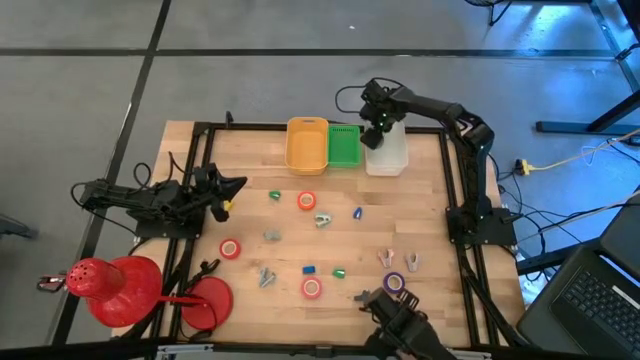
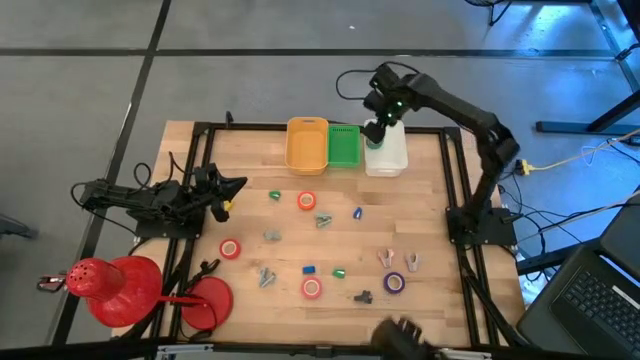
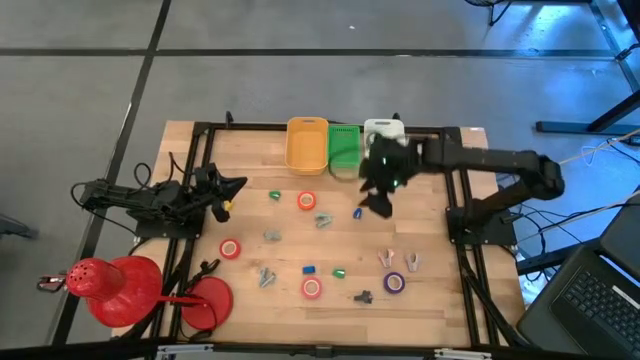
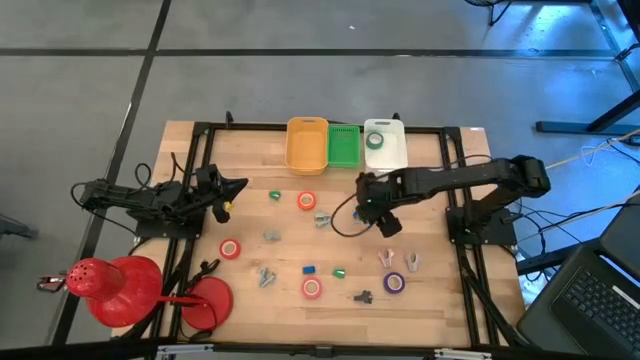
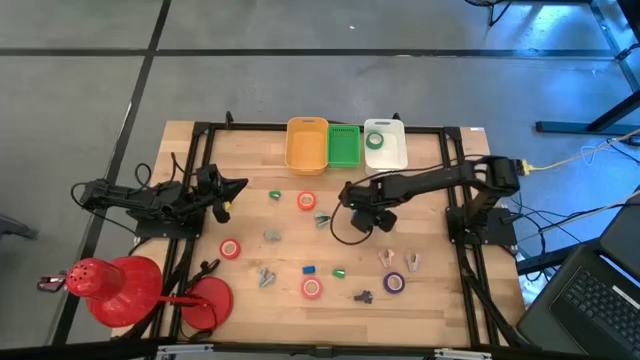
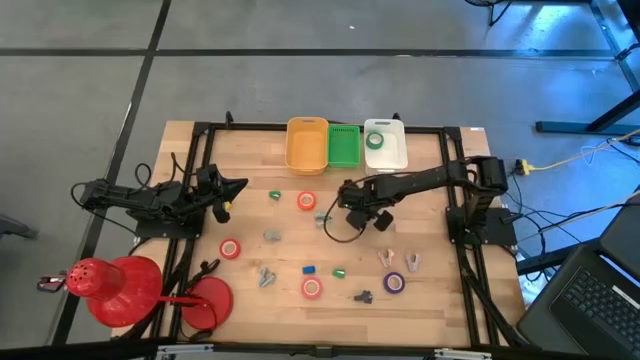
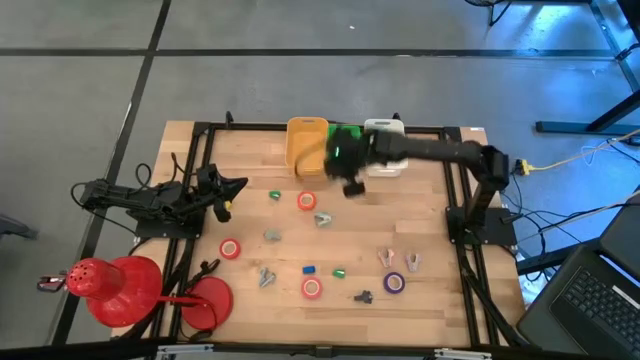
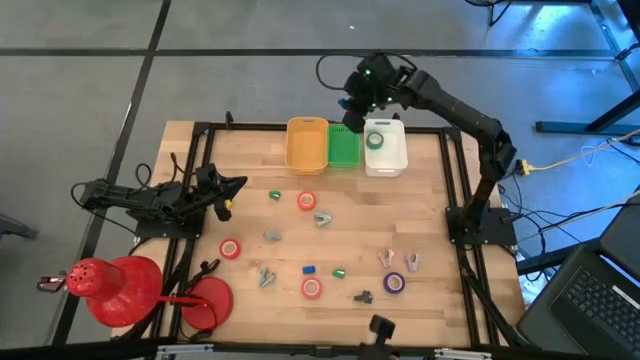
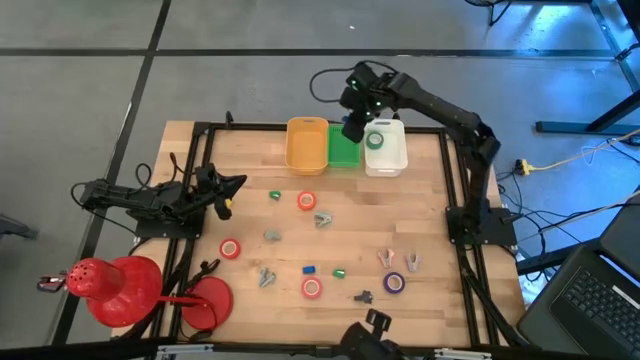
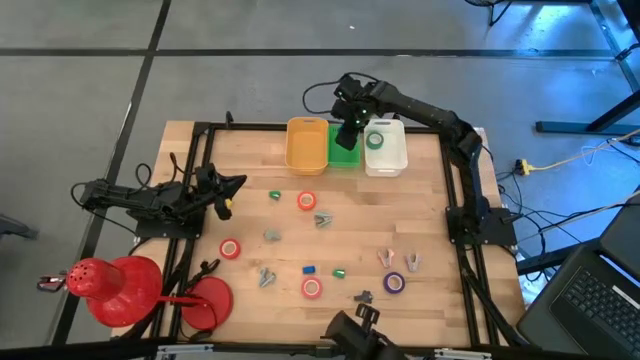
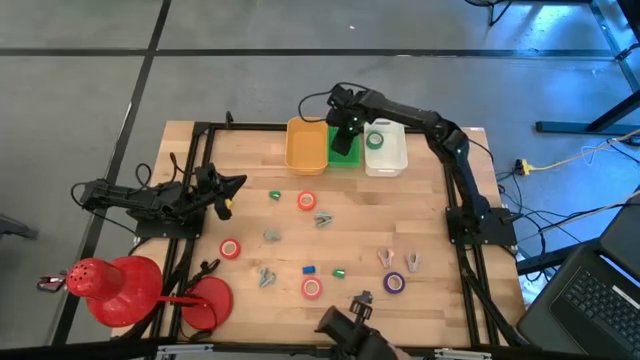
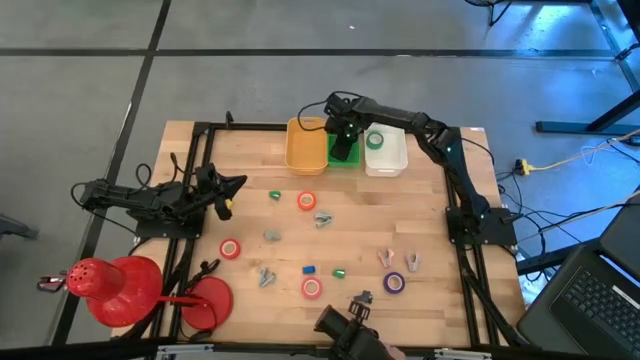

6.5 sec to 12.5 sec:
Task: Pick and place Stapler, Stapler remover, tape
Put the right blue stapler into the green bin

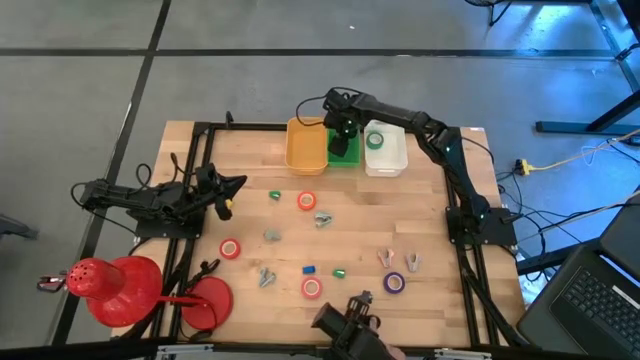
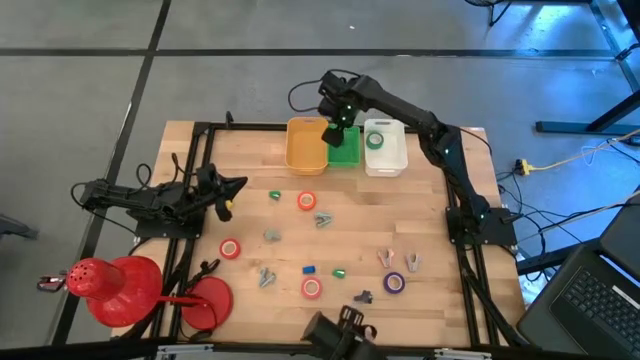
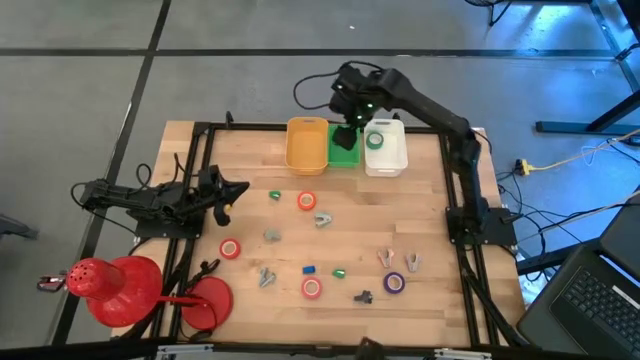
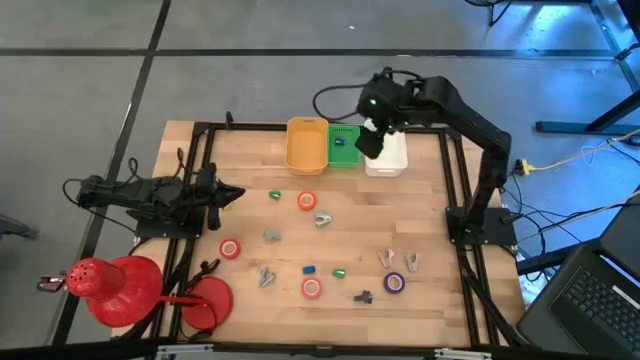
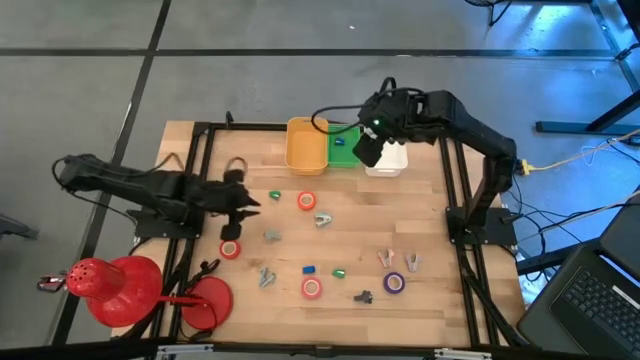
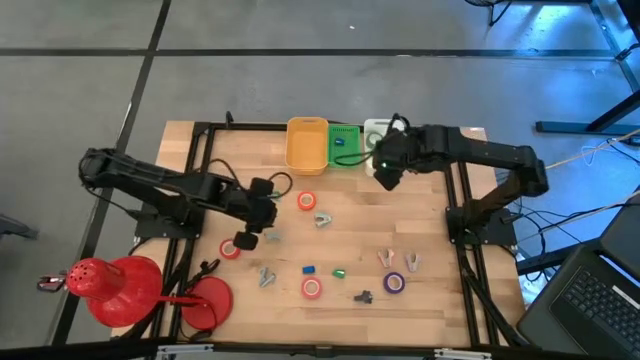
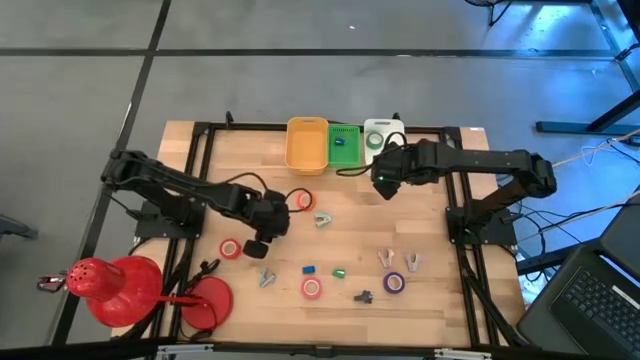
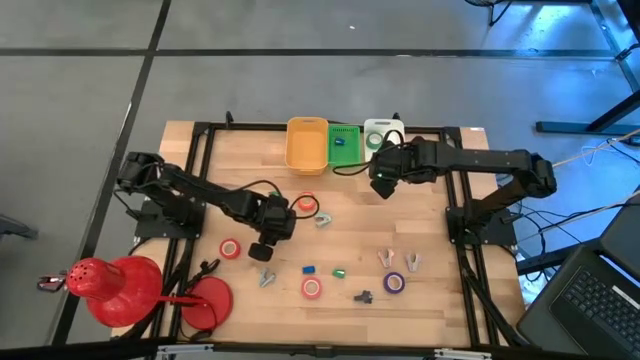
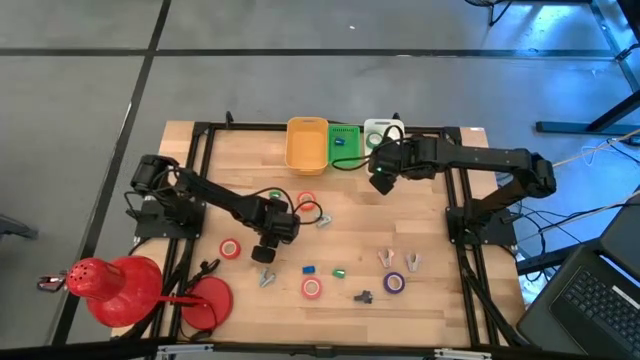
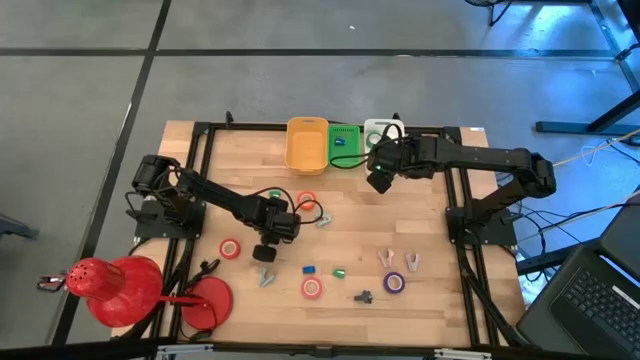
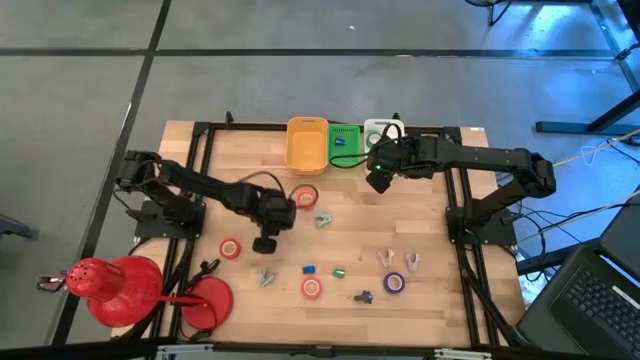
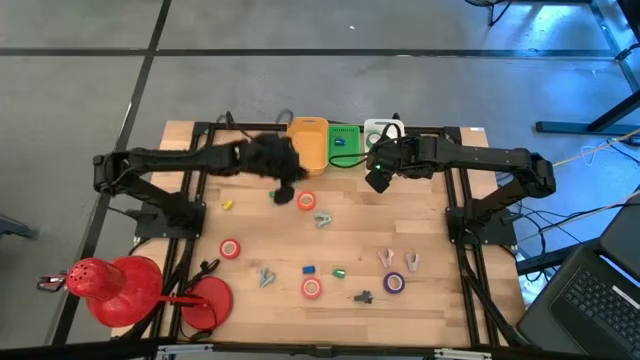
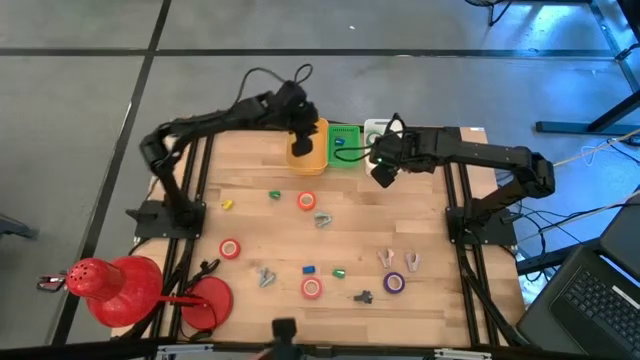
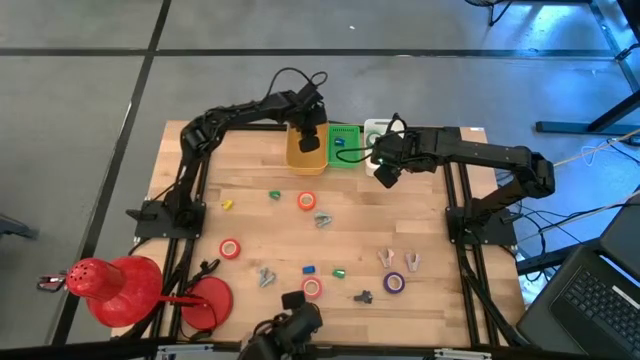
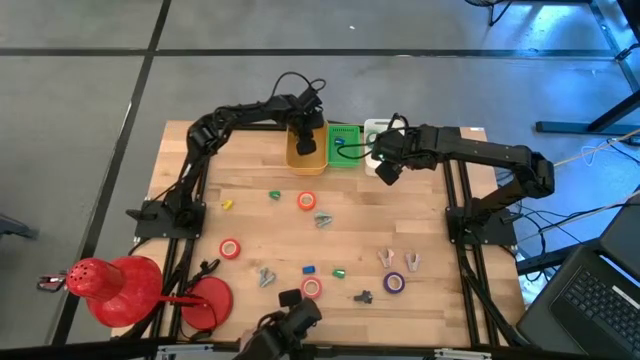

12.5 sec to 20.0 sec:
Put the top gray staple remover into the yellow bin

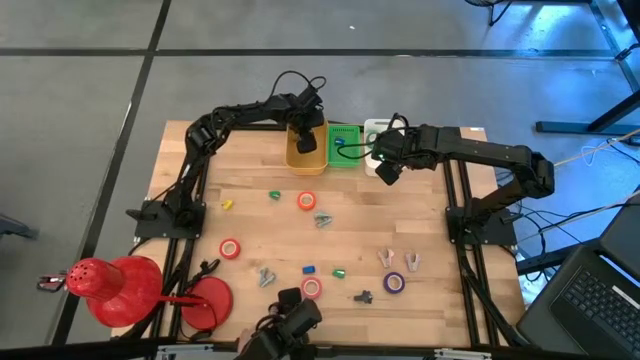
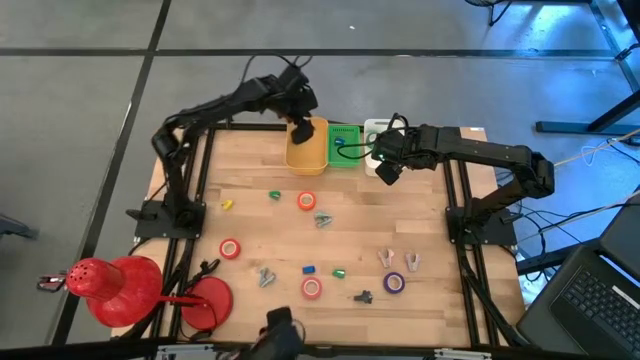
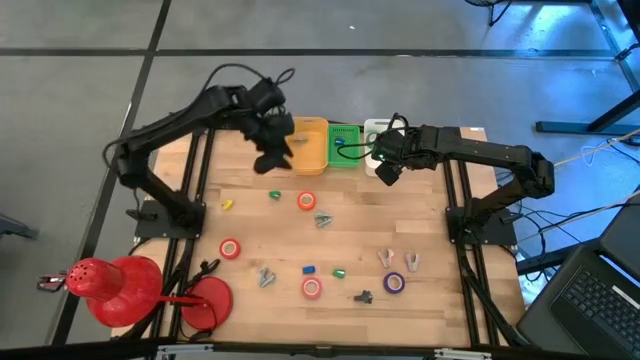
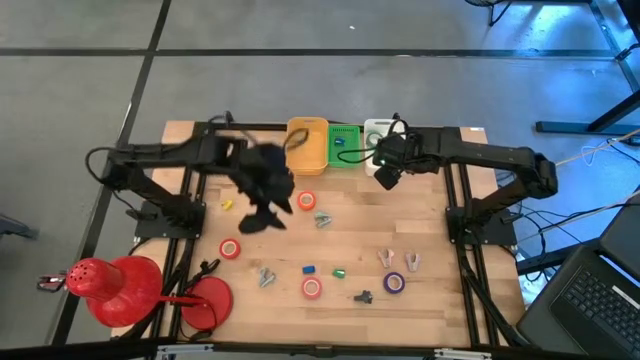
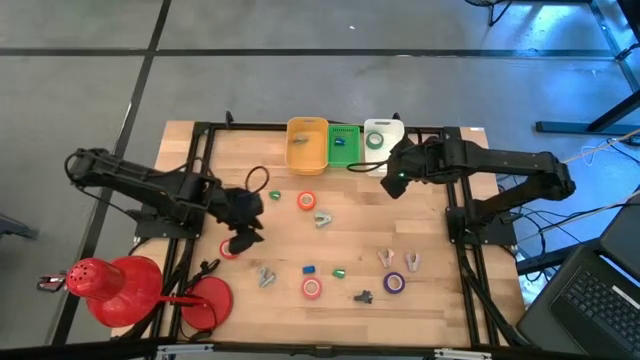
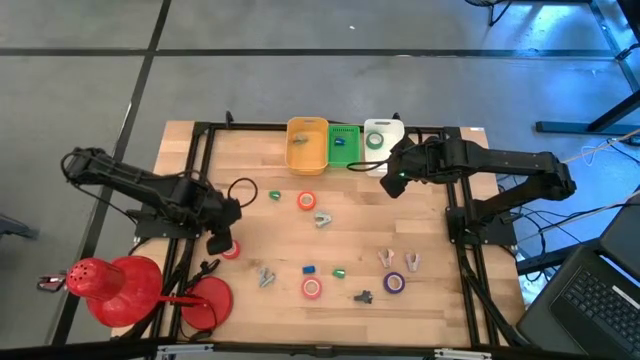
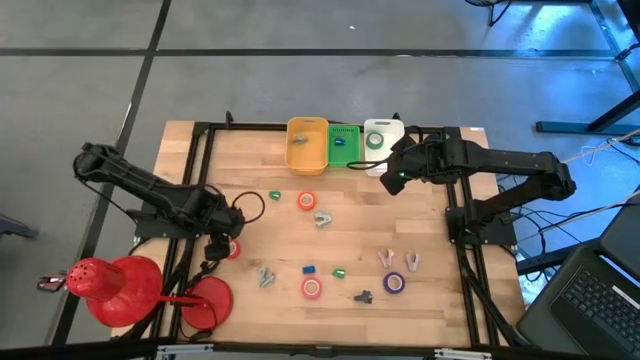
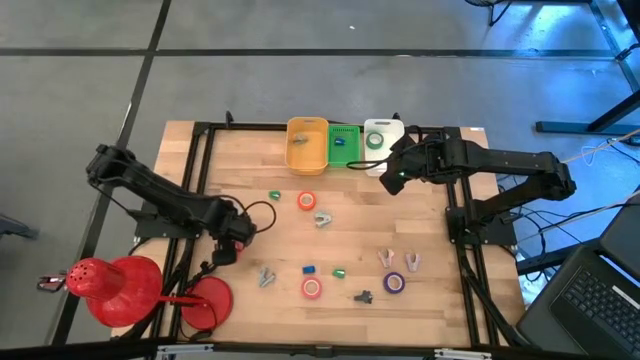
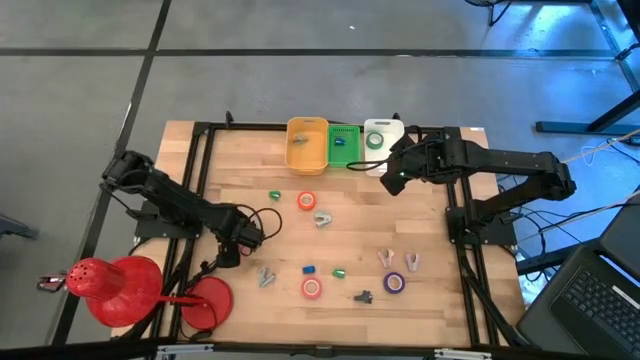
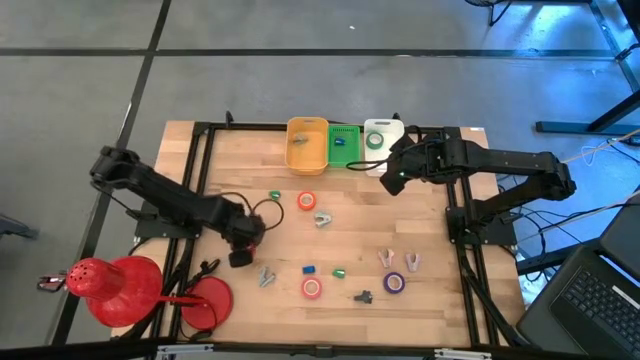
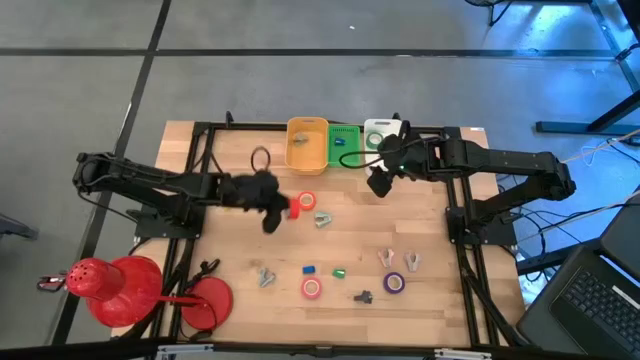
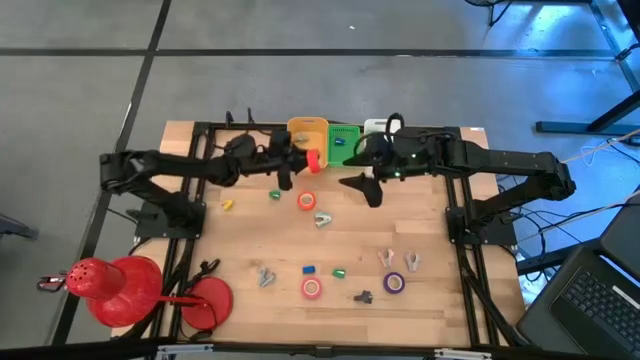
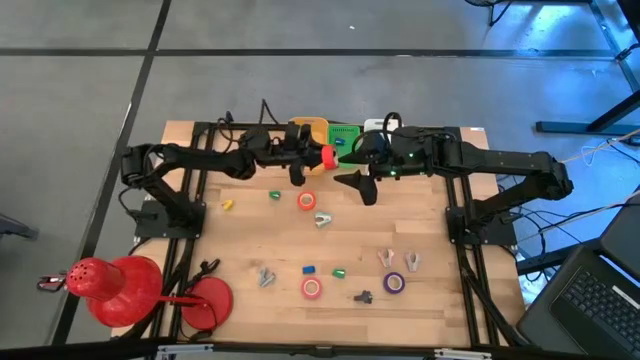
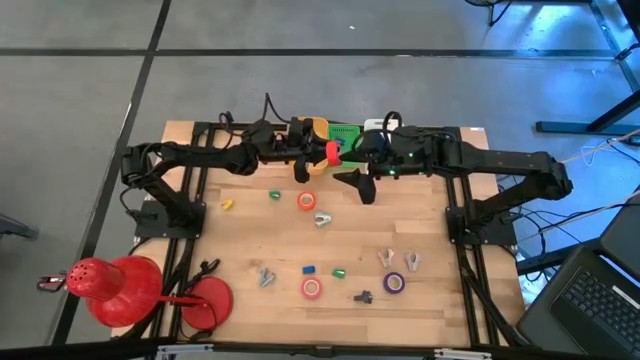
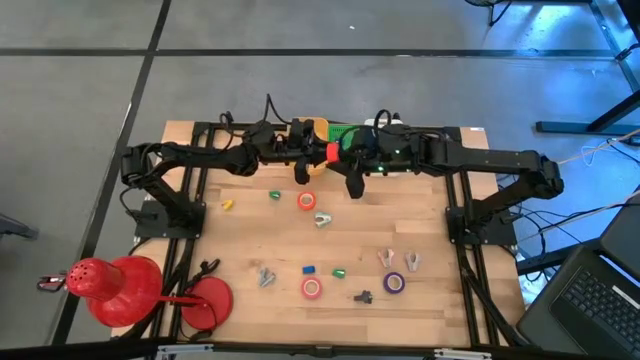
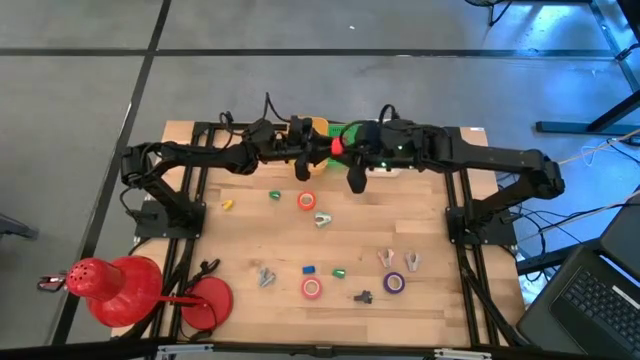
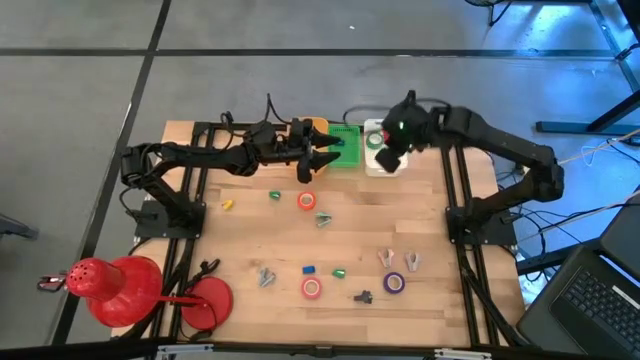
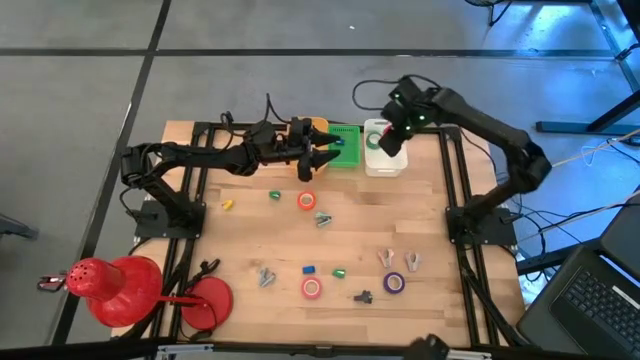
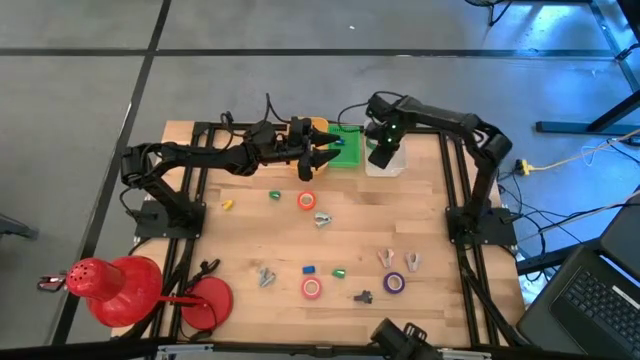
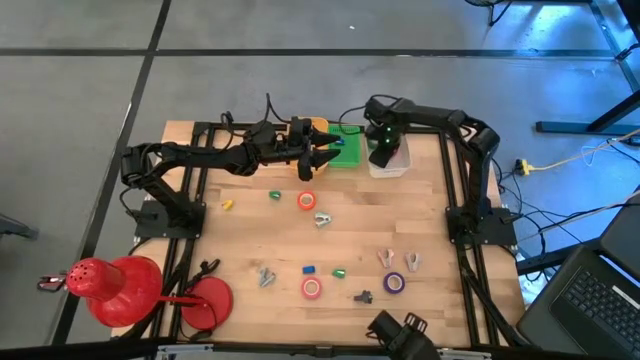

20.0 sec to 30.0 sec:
Put the red tape into the white bin
